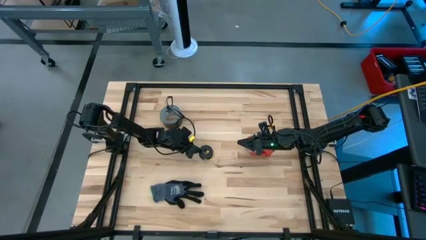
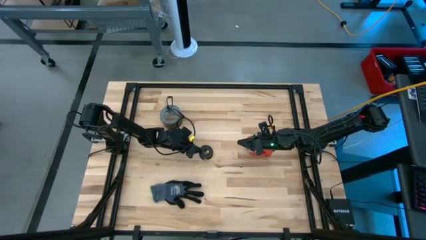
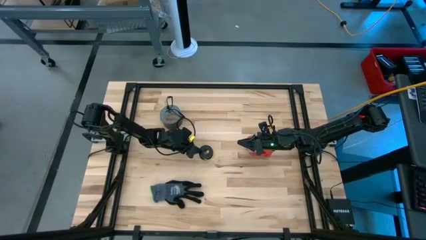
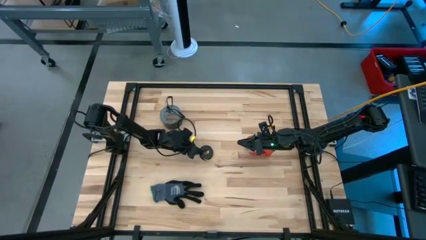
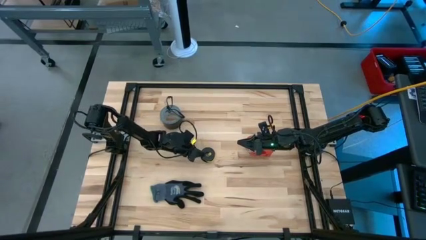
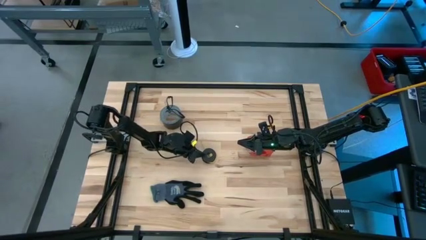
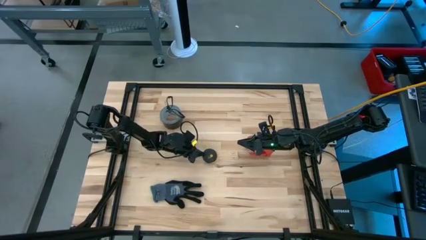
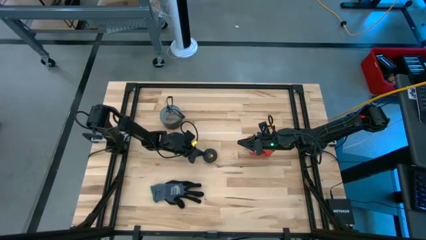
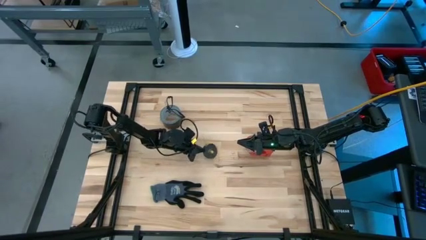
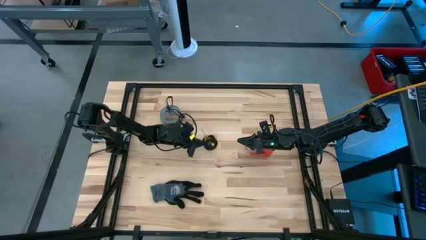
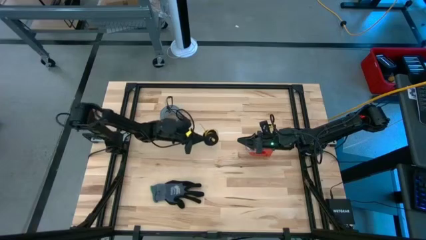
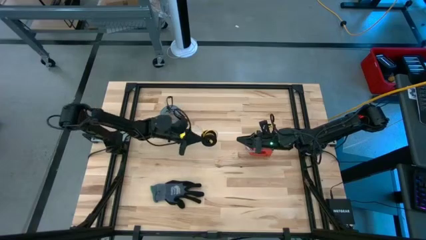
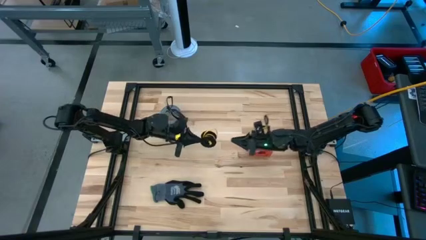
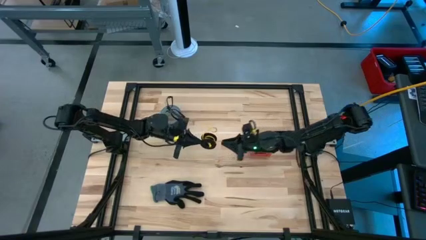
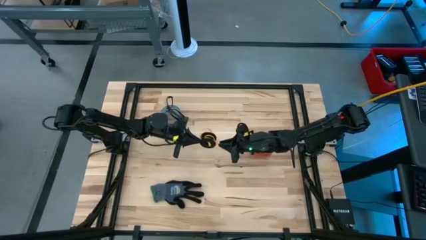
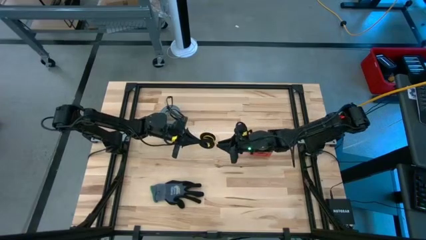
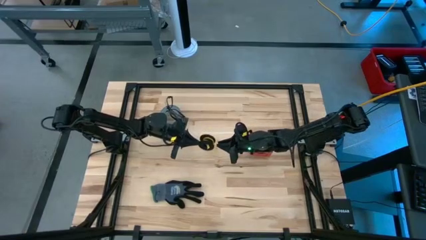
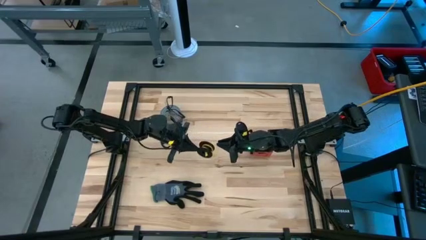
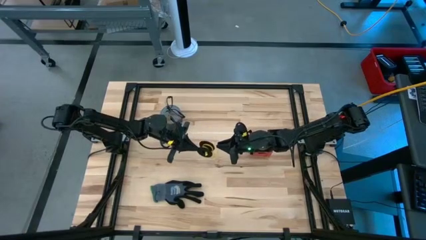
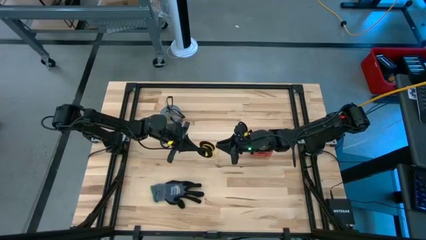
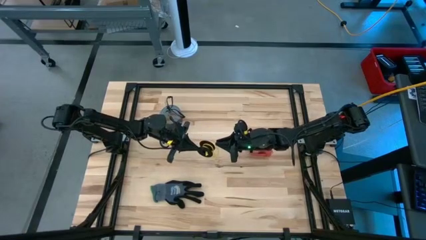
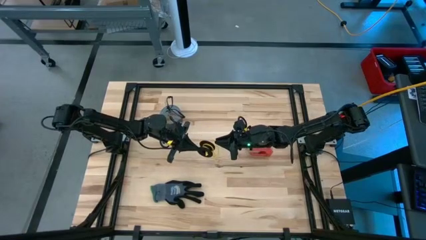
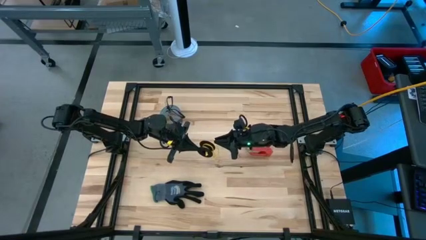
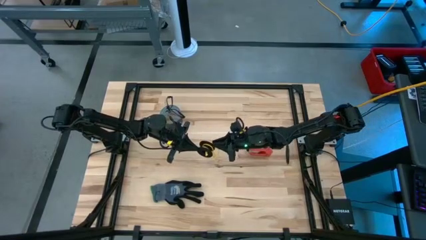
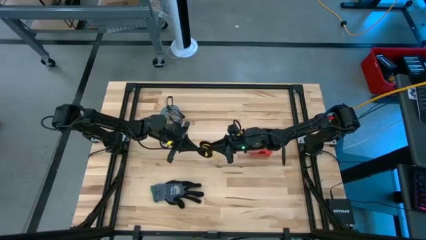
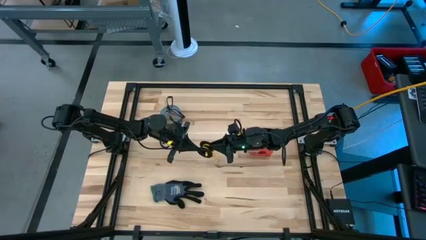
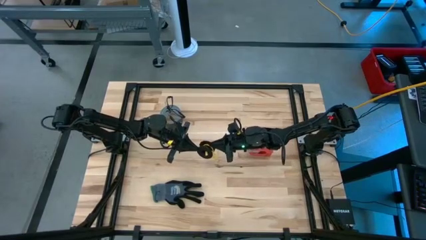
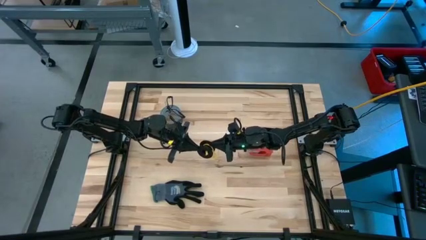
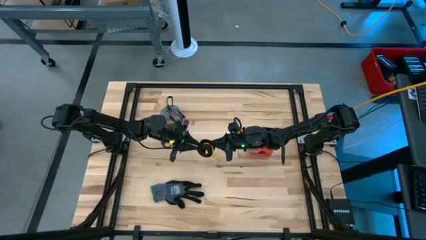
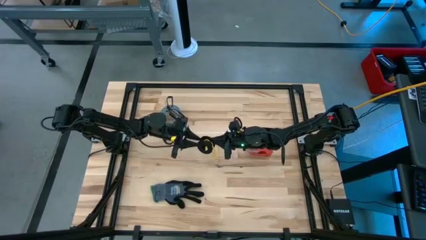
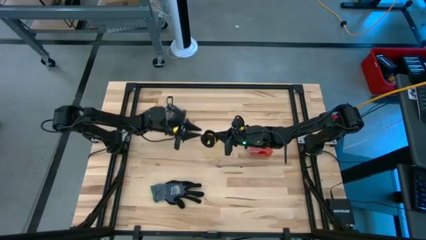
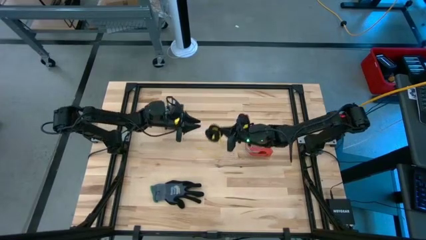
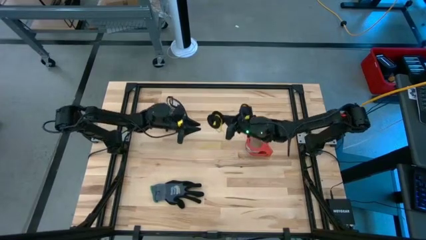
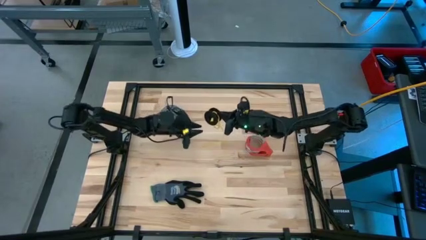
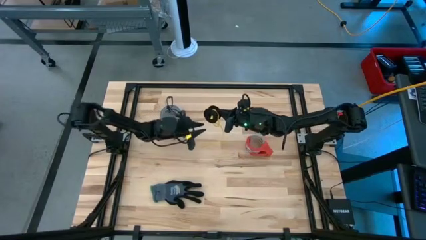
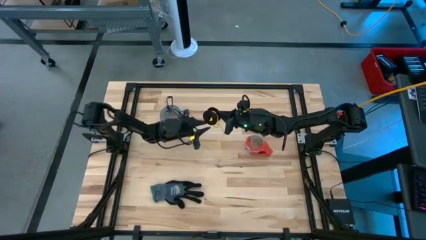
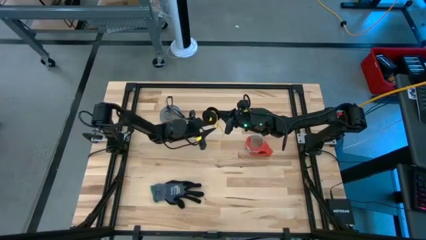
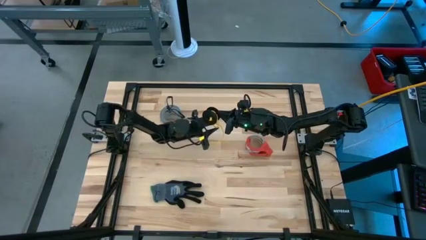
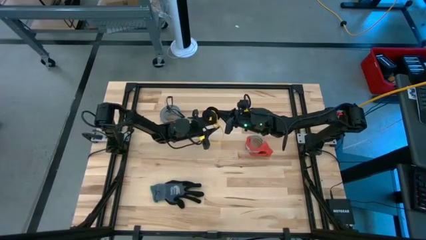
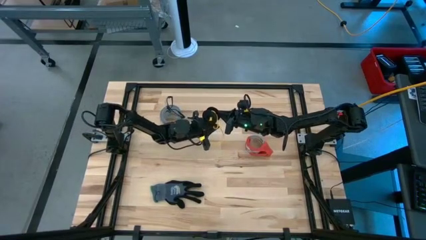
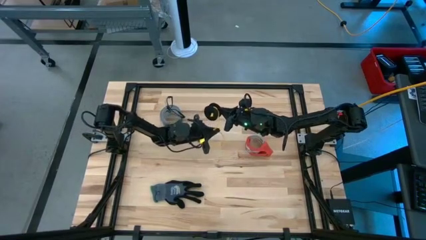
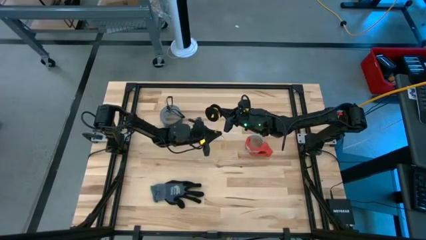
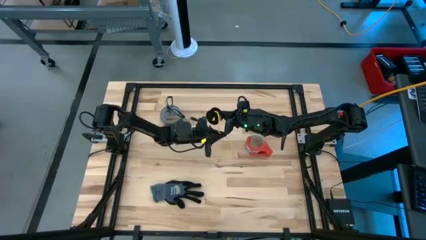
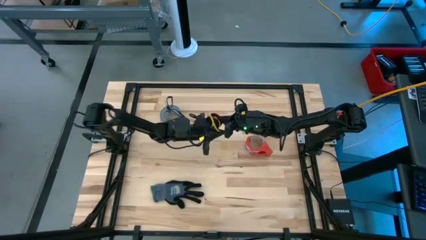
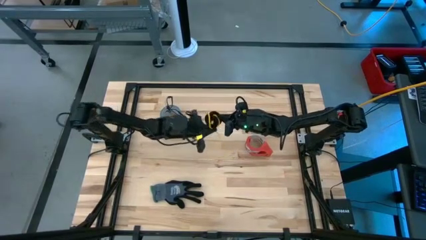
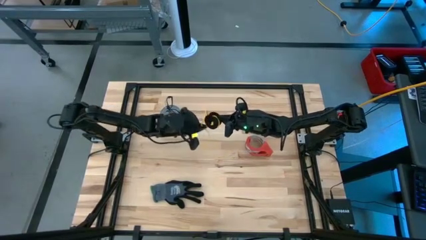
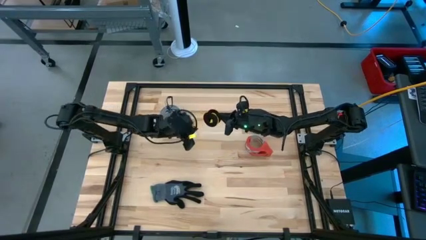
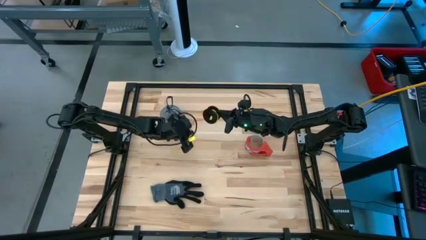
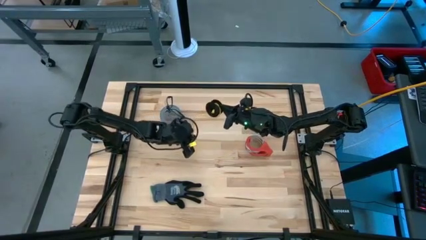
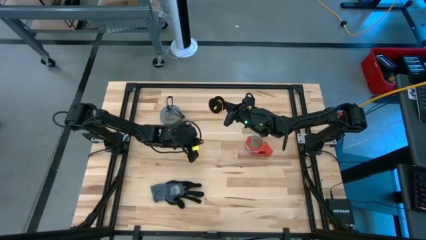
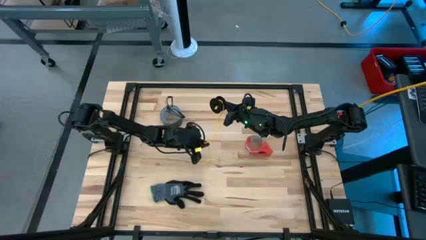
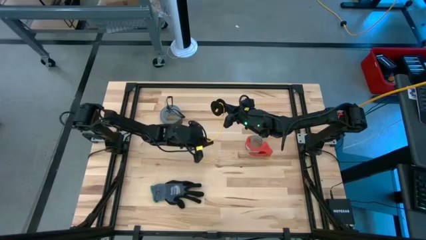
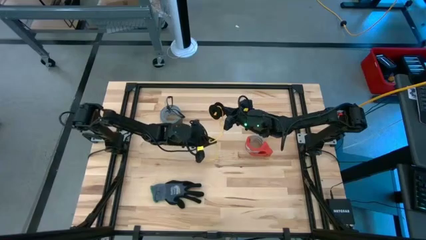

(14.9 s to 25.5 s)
Task: Coil cords
Uncoil the yellow wire from the spool

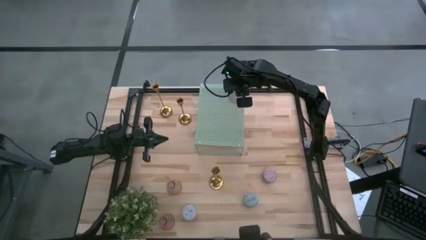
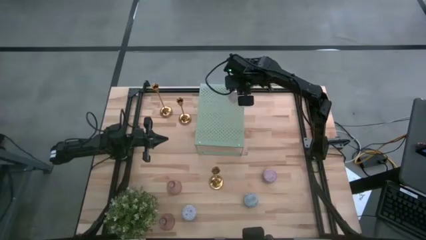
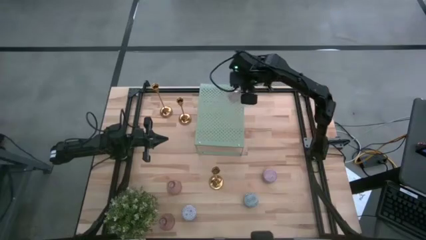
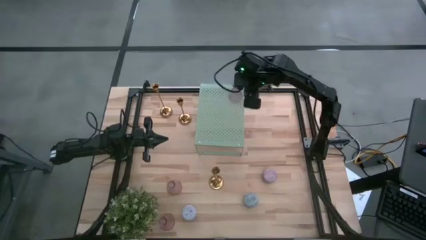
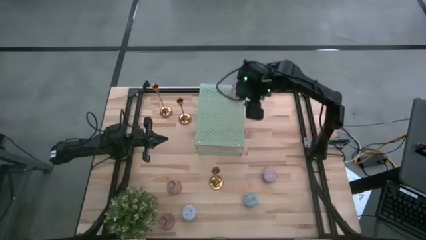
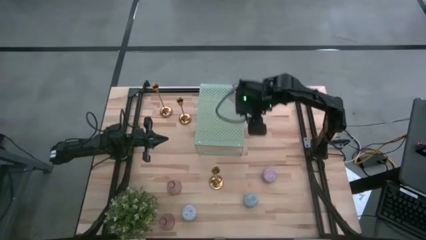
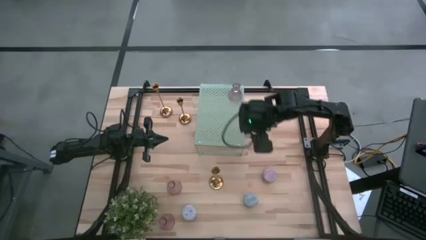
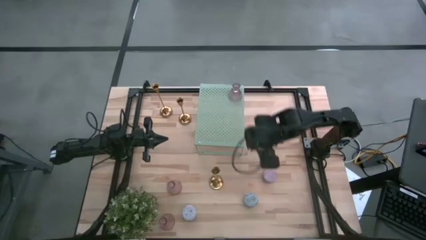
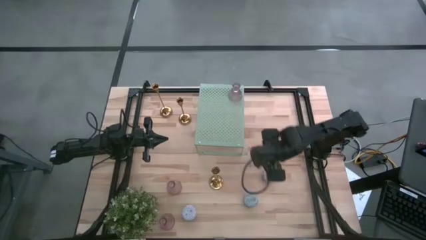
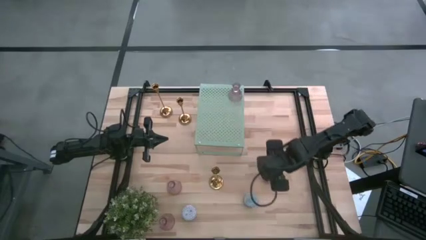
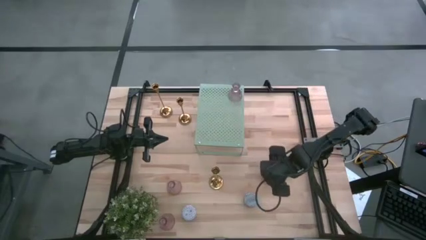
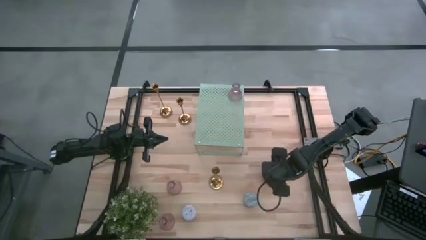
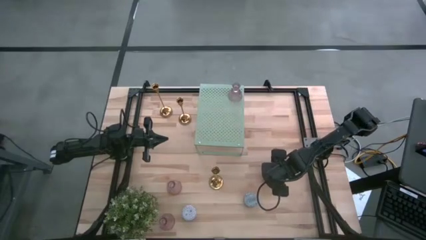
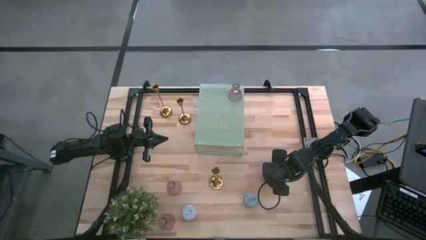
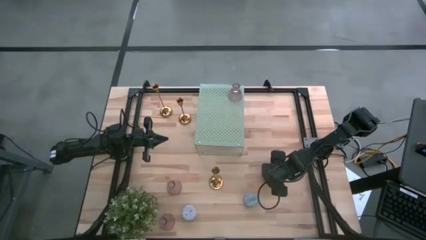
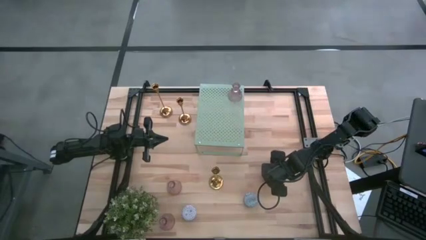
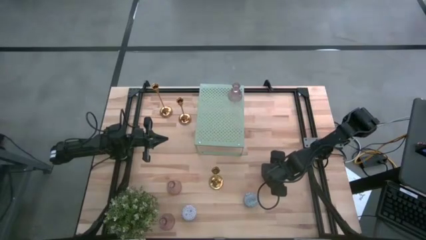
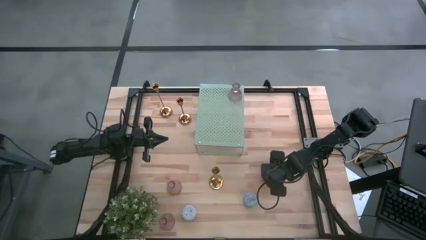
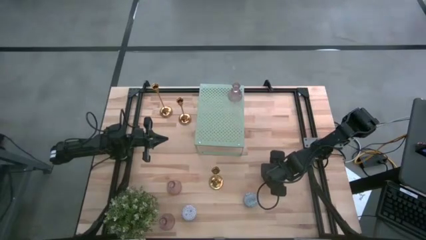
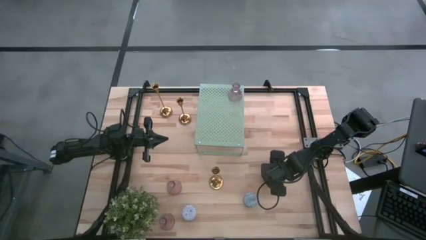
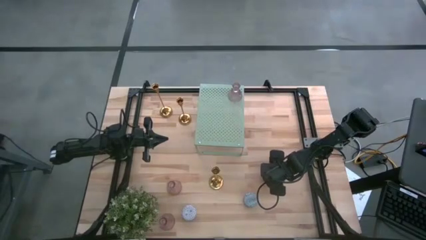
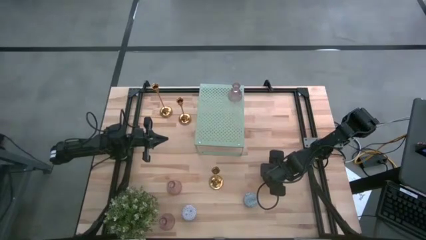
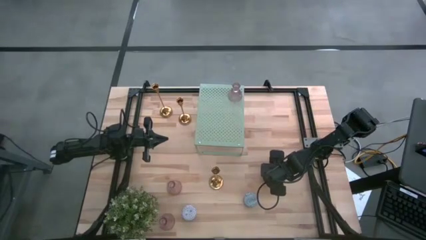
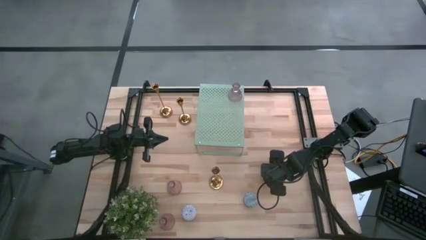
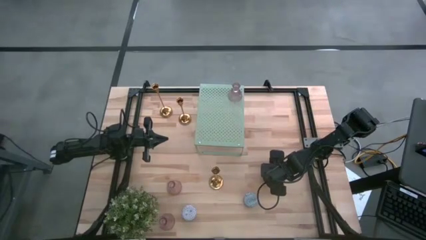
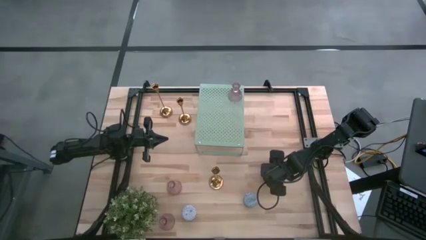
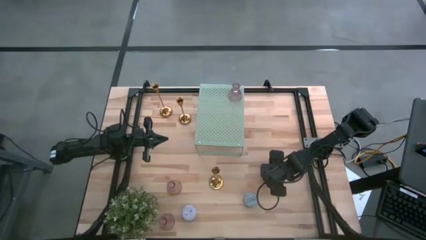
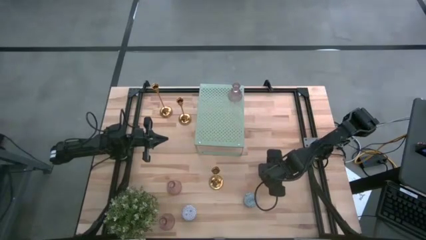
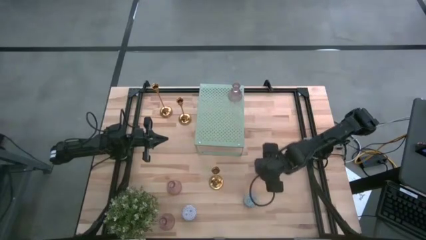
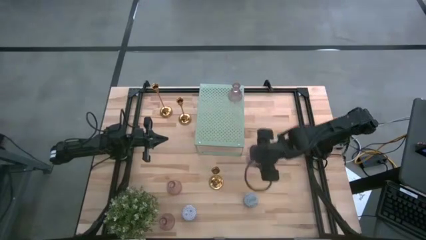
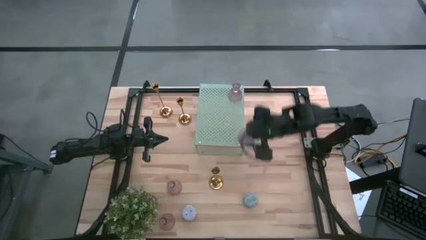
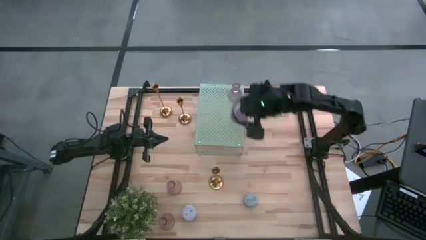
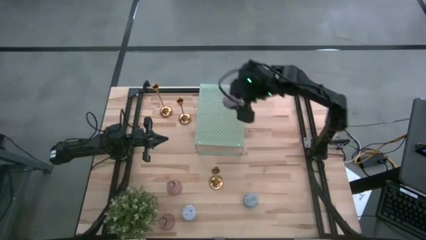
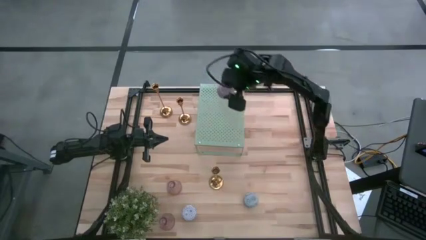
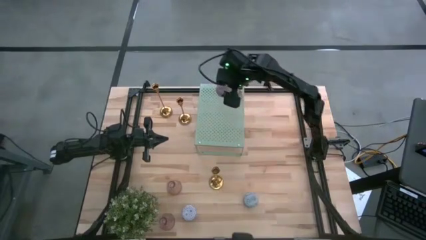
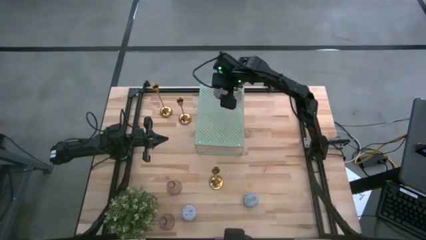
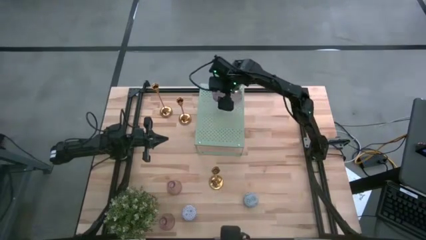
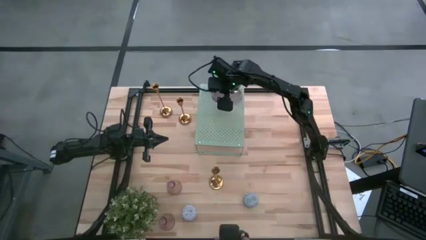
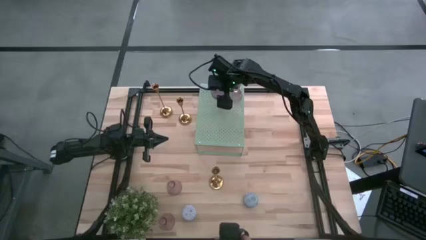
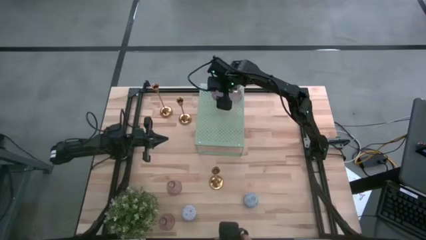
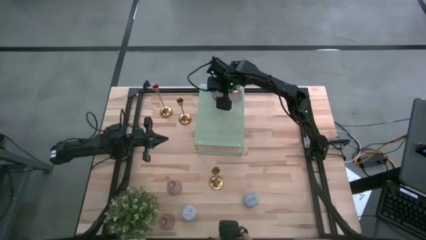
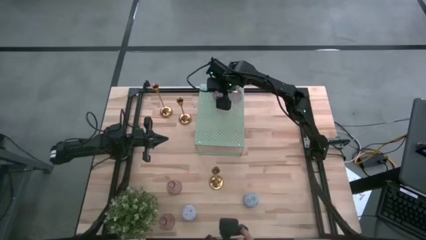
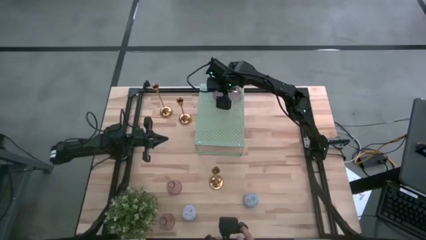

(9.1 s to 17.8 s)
Task: Pick & Place candle stick holders
Put the patterned pink scented candle on the shelf
